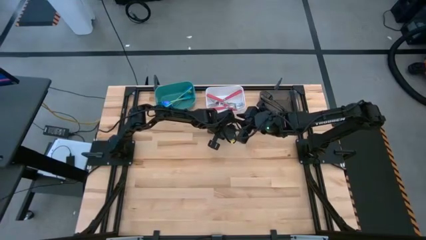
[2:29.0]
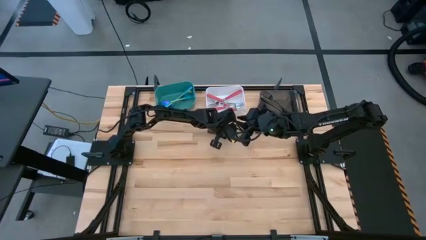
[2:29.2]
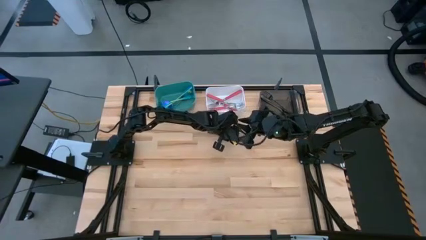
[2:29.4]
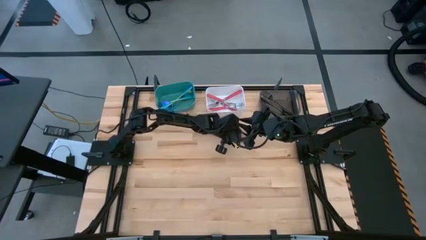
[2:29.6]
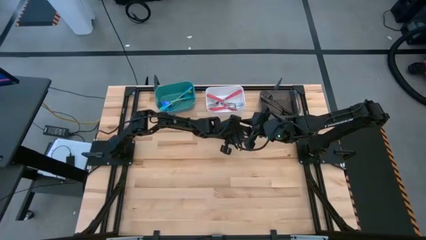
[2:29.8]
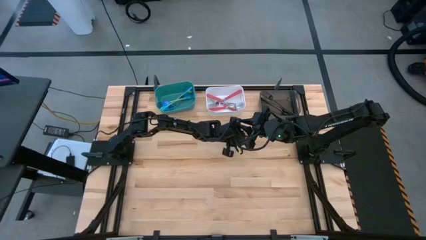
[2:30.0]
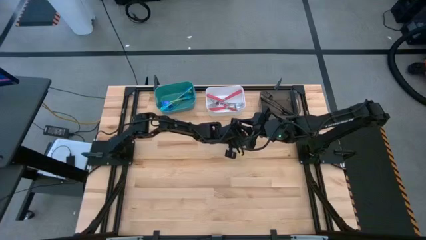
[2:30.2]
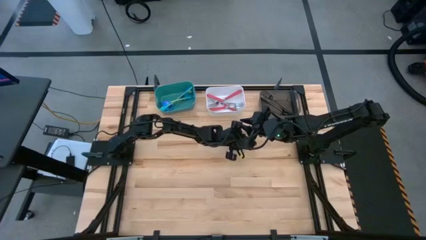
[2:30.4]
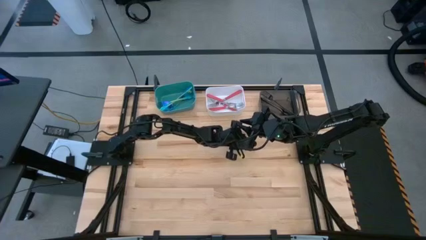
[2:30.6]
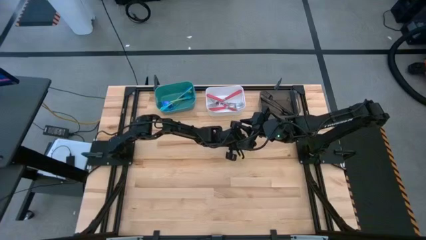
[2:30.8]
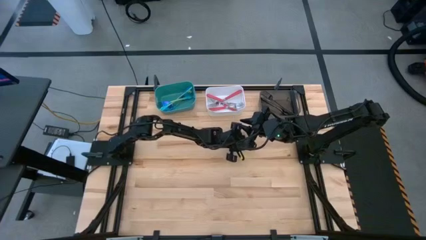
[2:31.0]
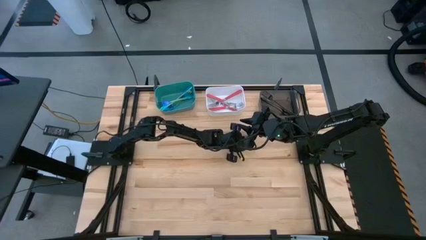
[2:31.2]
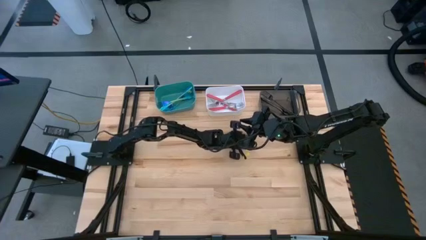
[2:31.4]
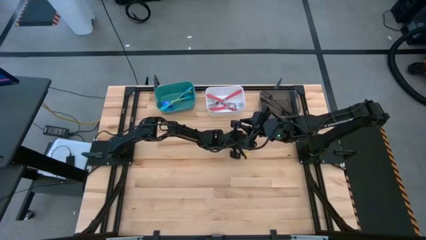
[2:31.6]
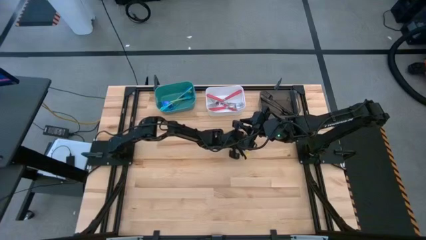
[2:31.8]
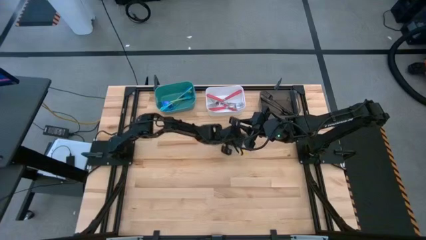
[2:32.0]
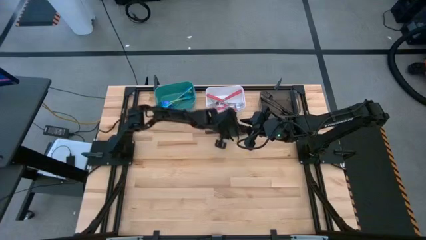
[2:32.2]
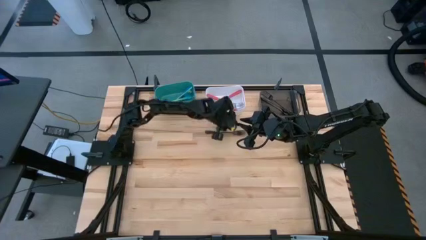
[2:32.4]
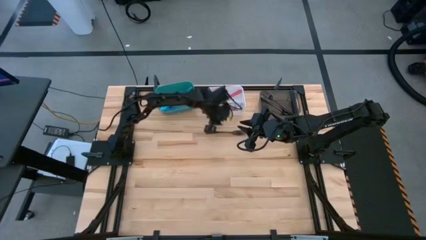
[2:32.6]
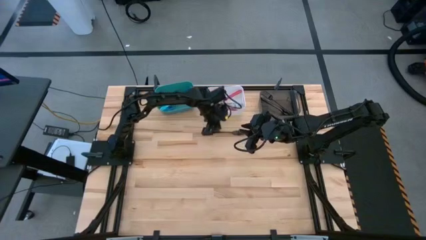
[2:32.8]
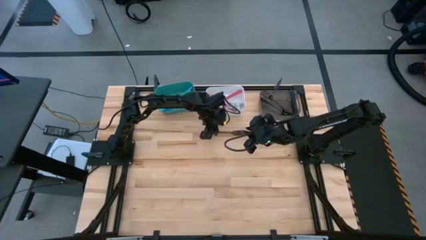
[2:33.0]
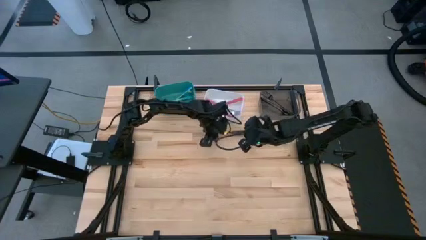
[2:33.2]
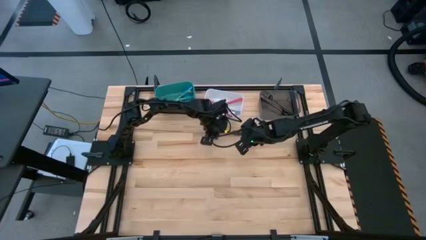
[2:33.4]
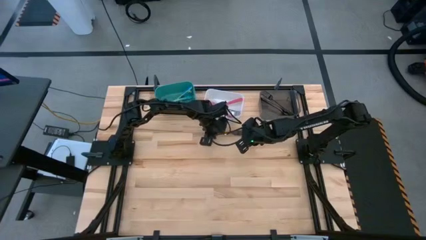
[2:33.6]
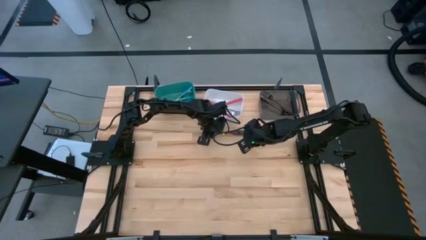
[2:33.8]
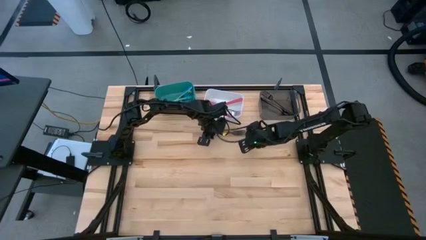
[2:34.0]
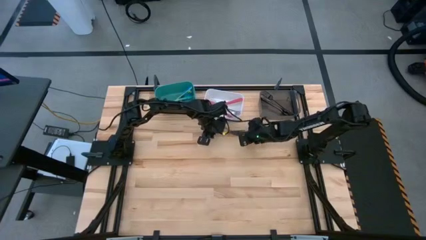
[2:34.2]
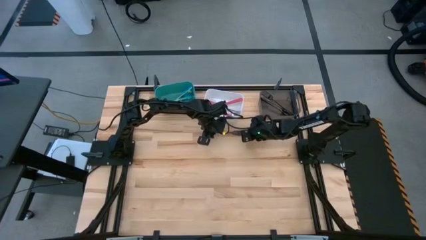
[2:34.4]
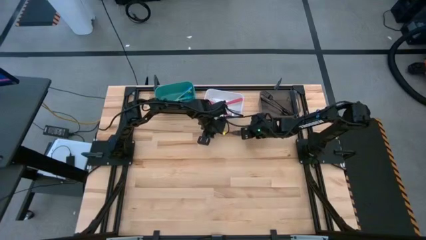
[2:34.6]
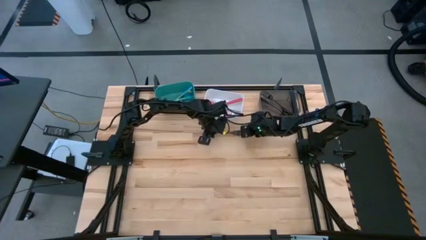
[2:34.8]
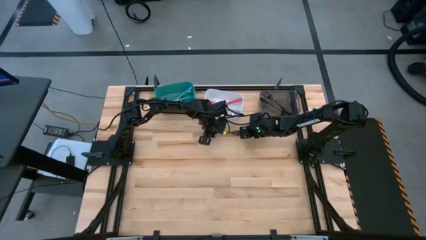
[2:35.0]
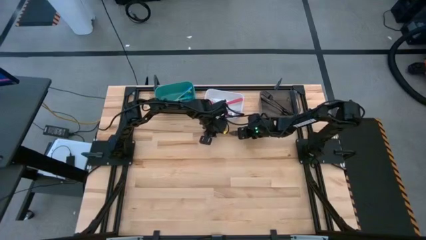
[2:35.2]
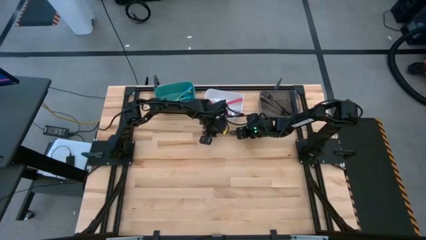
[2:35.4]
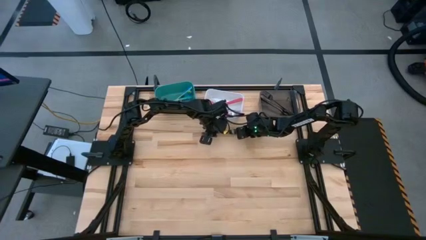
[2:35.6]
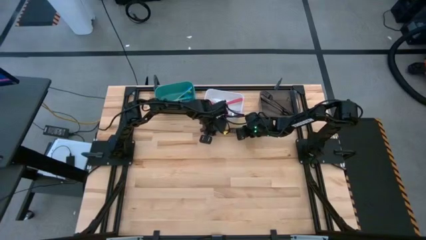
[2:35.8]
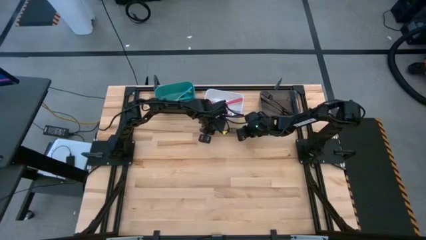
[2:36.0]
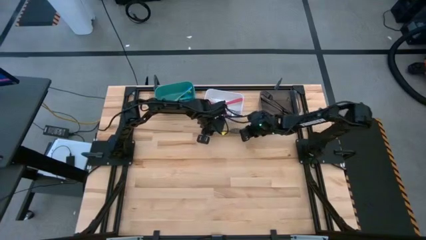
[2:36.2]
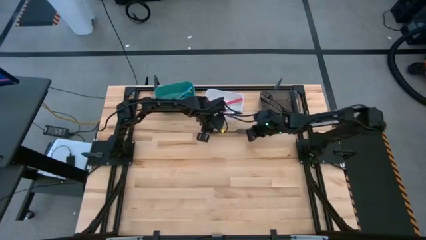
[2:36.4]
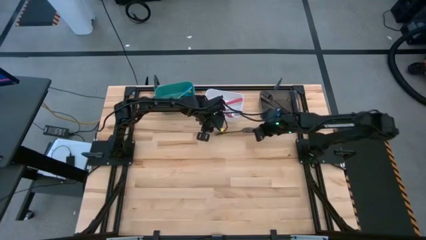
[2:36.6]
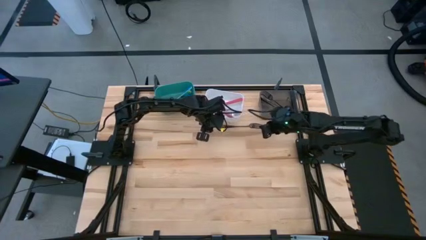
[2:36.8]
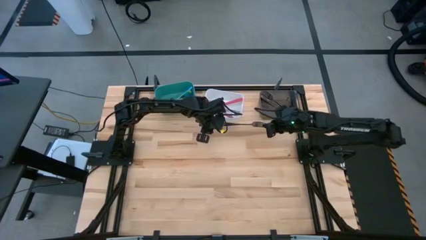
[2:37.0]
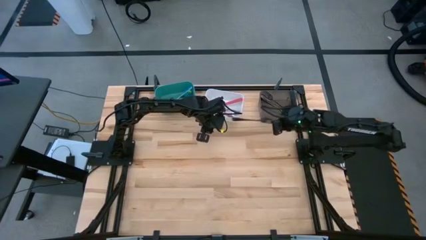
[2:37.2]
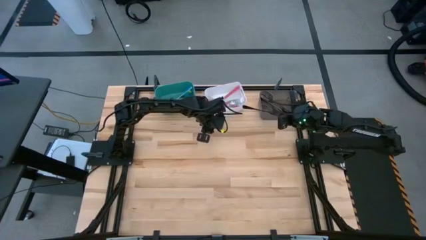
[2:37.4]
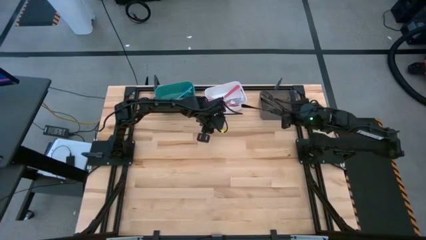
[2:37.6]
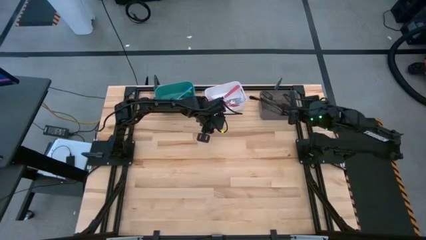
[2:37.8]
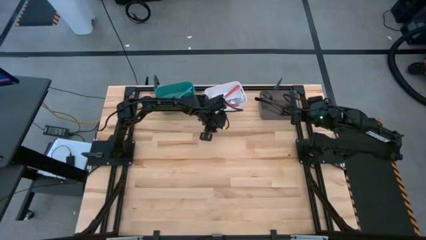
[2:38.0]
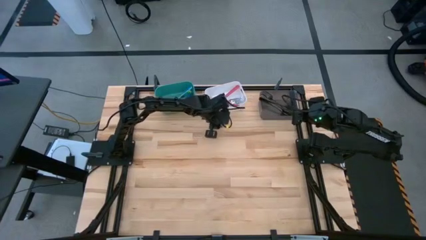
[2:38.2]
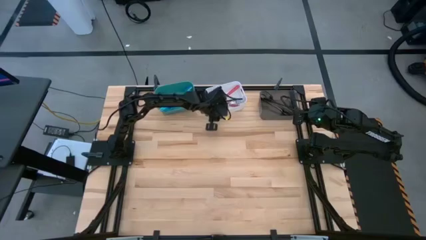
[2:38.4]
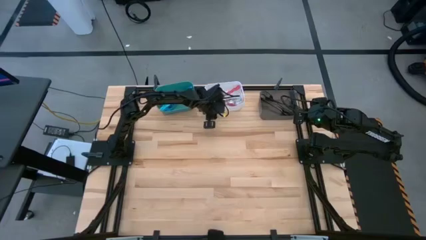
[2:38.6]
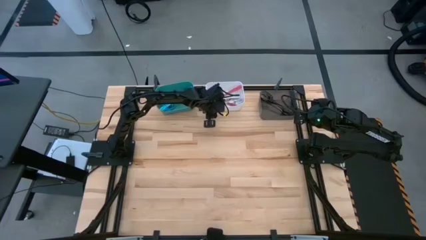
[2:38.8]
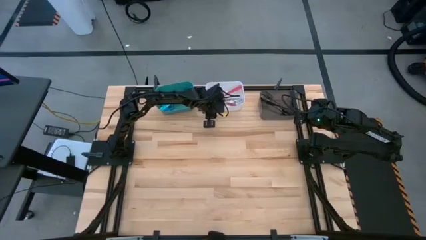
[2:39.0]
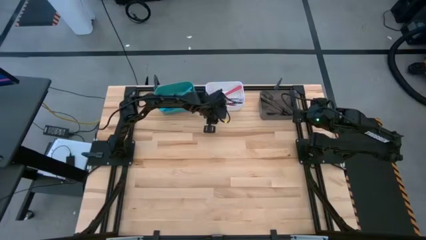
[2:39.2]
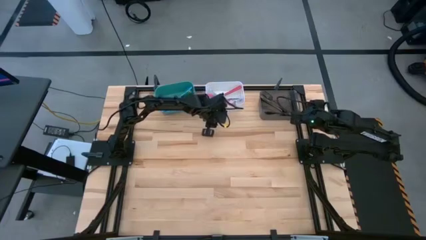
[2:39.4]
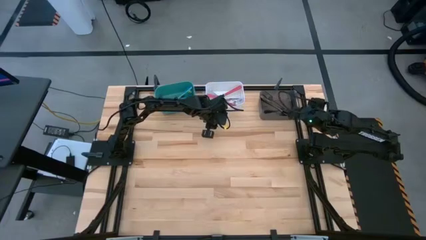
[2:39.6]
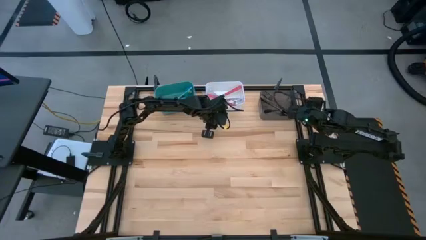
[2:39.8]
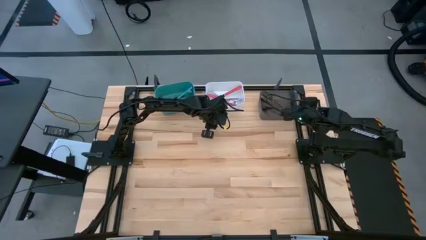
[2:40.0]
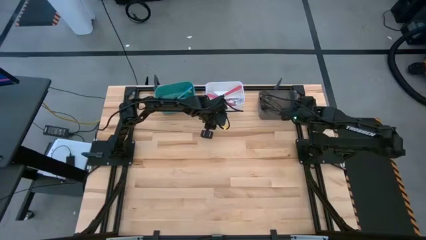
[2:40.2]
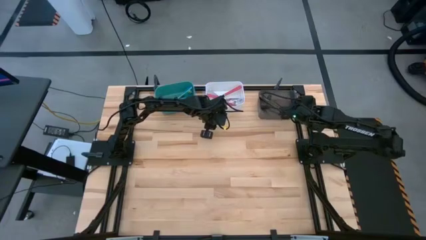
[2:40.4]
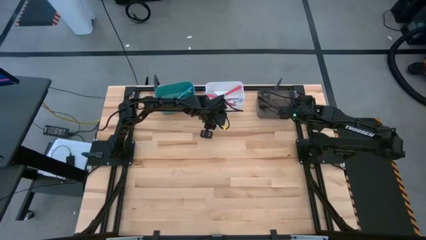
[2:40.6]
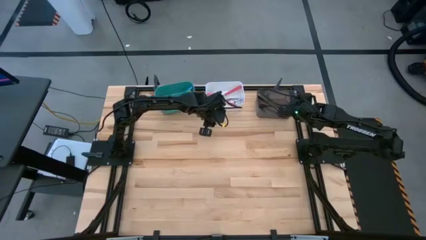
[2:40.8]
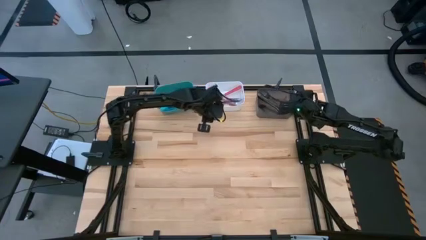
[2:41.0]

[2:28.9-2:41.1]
Task: Sort silverware by color (type)
Put the black fork into the black bin
